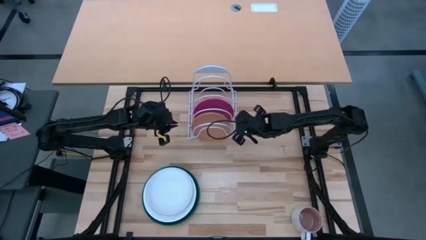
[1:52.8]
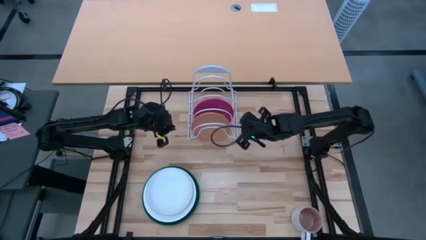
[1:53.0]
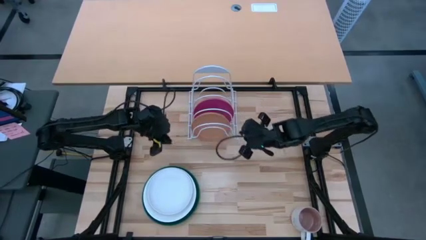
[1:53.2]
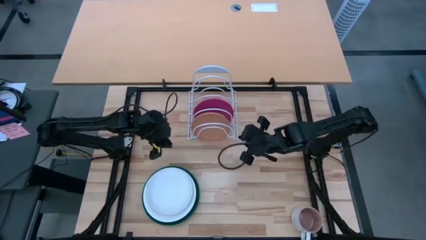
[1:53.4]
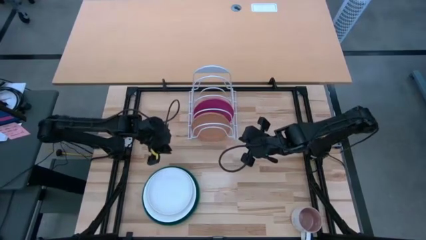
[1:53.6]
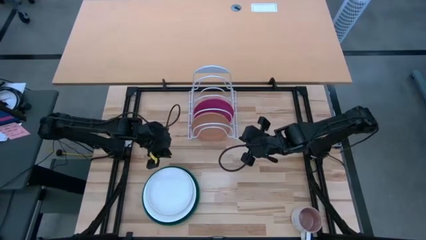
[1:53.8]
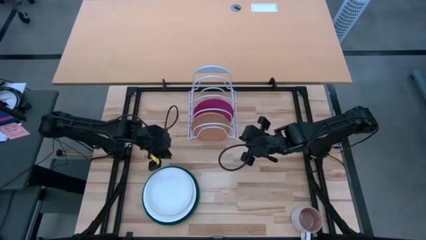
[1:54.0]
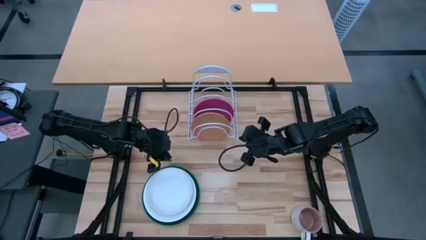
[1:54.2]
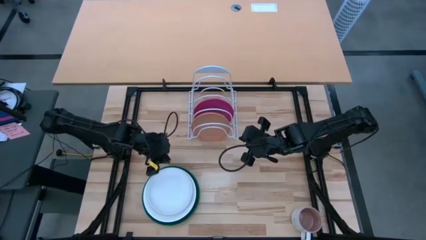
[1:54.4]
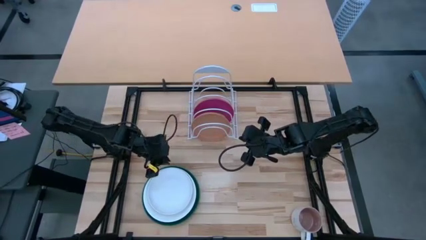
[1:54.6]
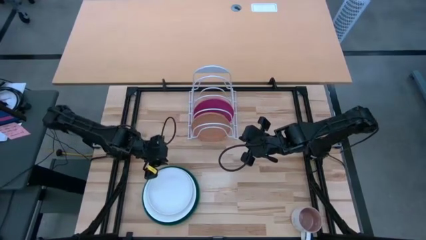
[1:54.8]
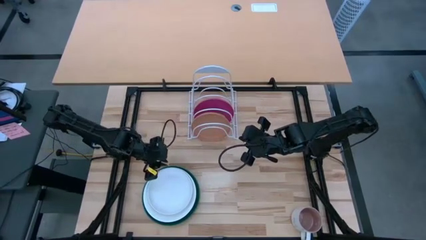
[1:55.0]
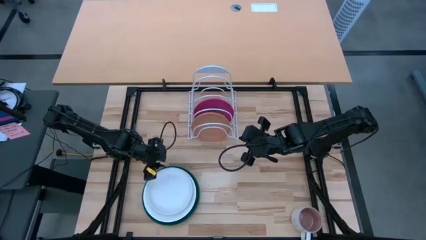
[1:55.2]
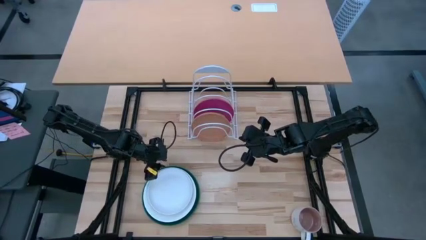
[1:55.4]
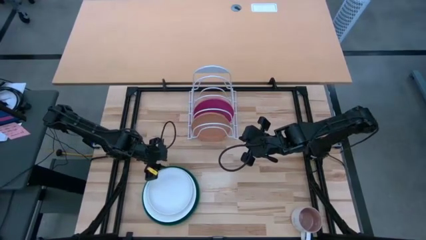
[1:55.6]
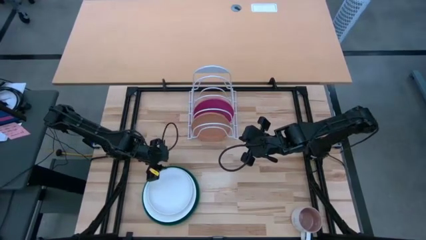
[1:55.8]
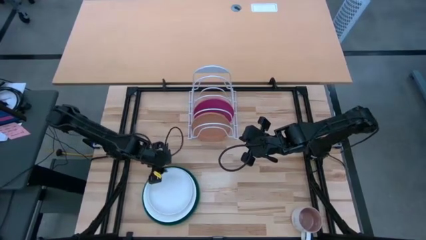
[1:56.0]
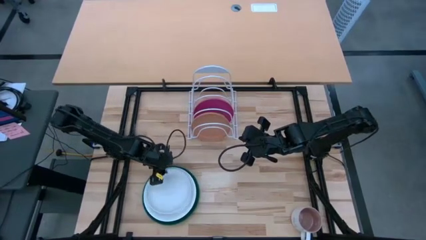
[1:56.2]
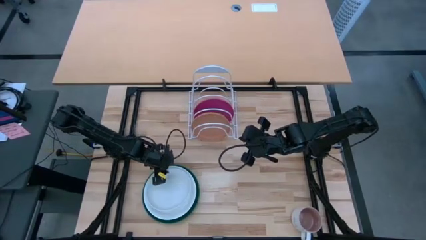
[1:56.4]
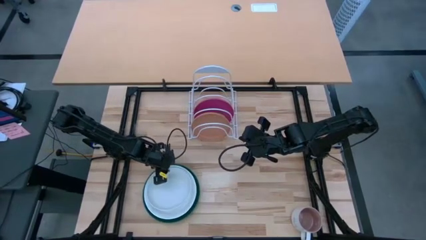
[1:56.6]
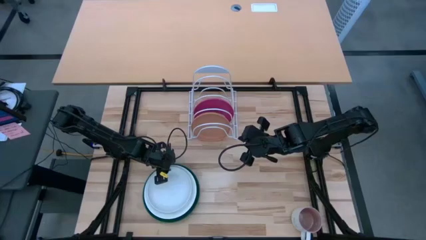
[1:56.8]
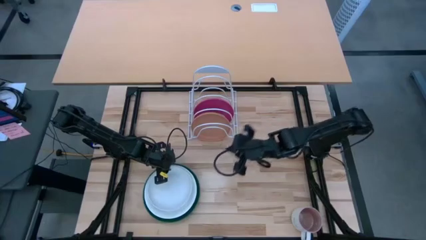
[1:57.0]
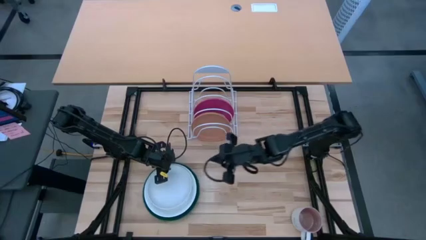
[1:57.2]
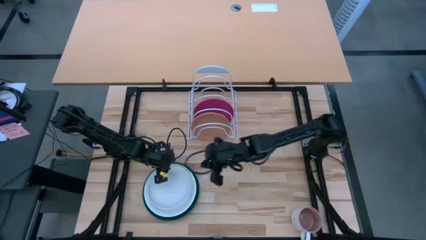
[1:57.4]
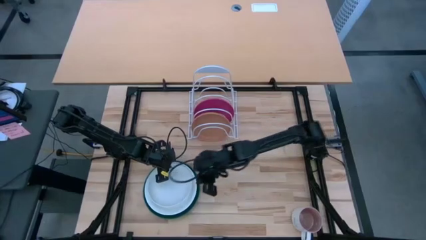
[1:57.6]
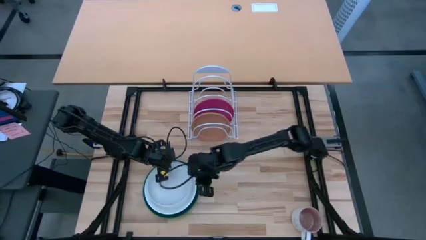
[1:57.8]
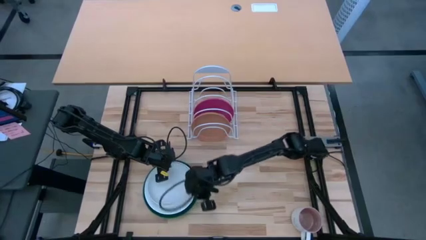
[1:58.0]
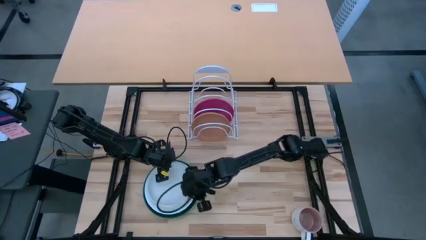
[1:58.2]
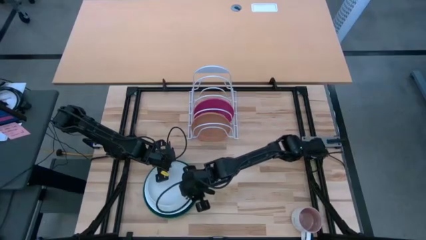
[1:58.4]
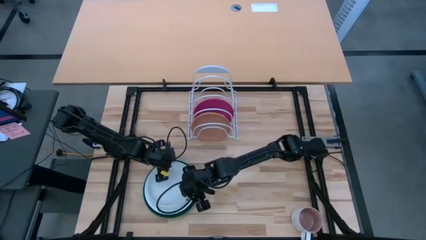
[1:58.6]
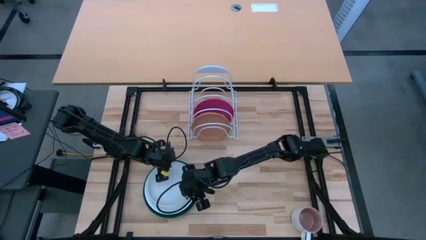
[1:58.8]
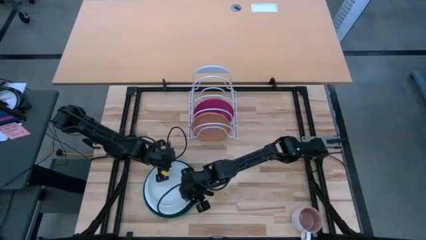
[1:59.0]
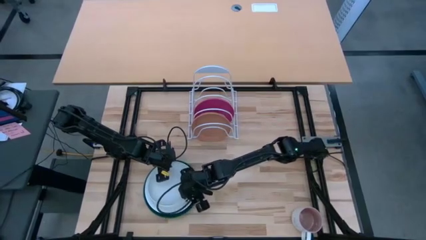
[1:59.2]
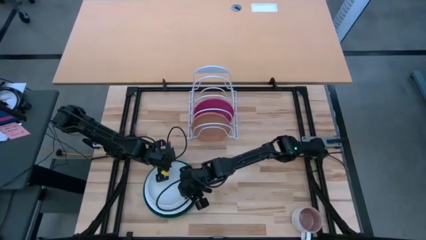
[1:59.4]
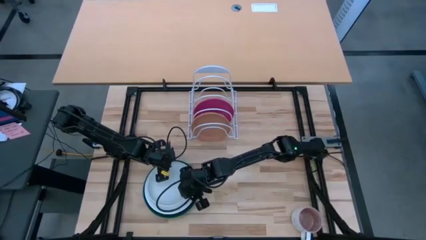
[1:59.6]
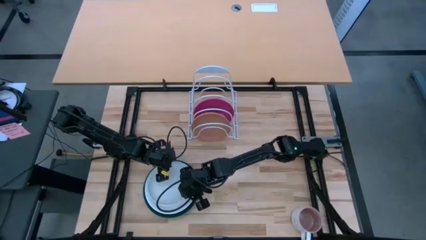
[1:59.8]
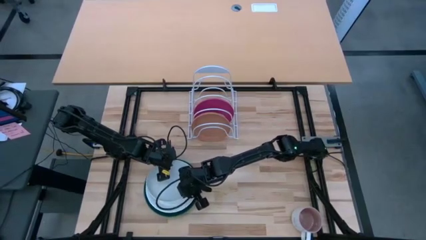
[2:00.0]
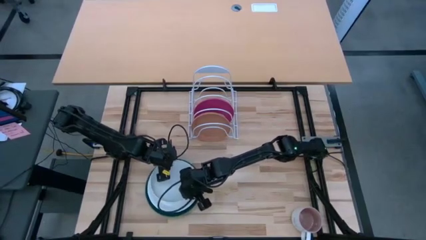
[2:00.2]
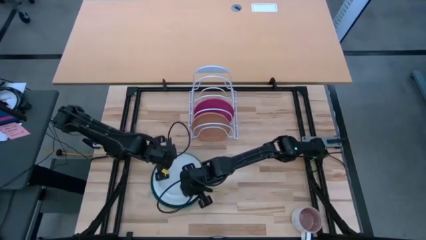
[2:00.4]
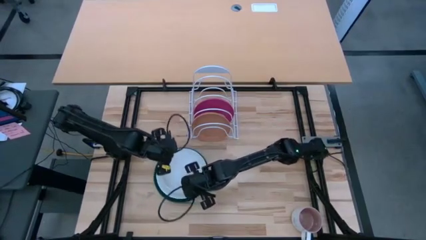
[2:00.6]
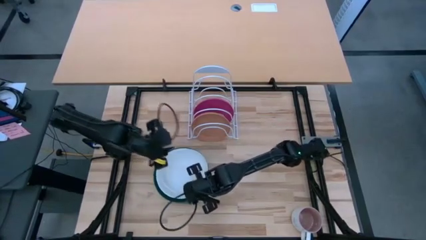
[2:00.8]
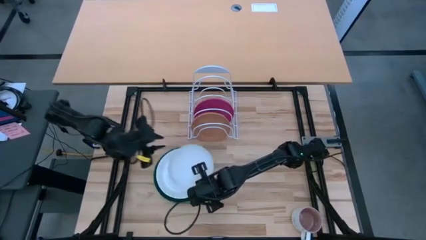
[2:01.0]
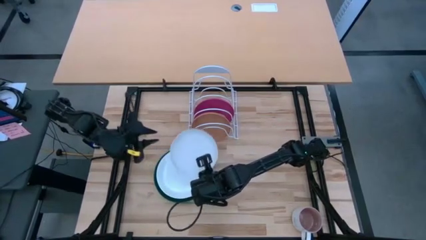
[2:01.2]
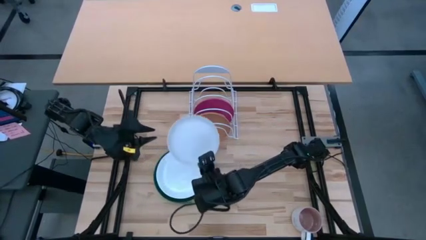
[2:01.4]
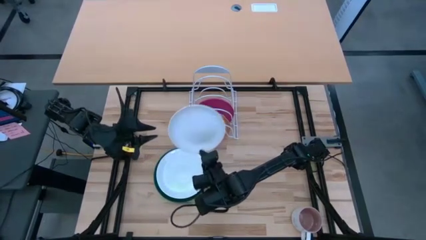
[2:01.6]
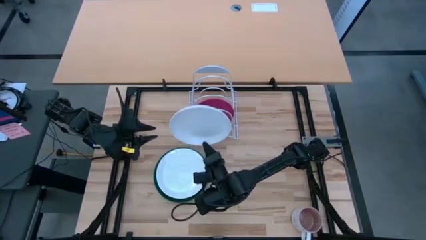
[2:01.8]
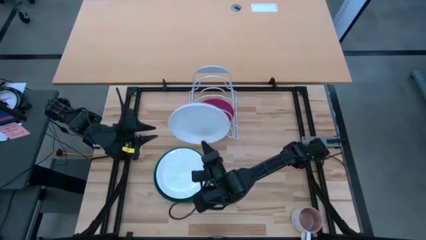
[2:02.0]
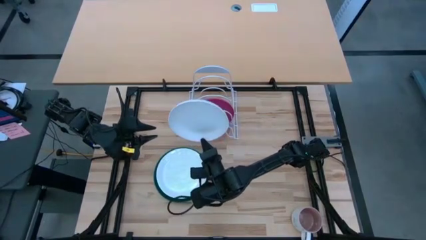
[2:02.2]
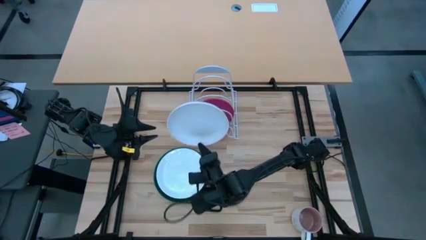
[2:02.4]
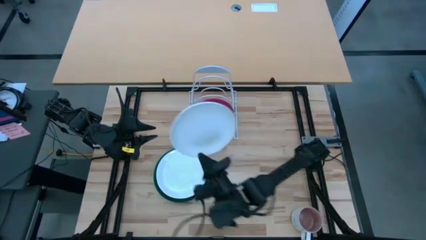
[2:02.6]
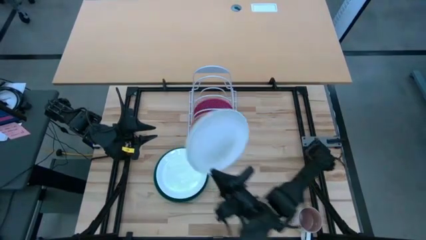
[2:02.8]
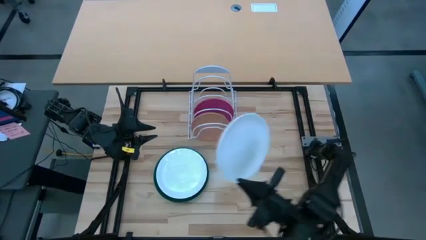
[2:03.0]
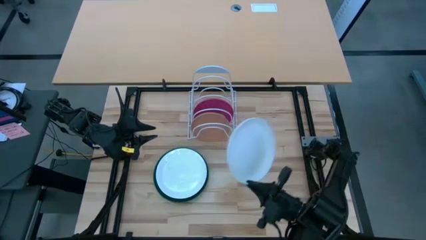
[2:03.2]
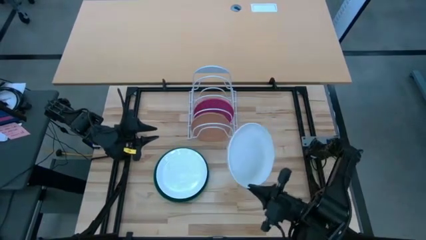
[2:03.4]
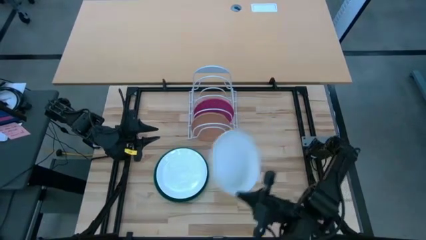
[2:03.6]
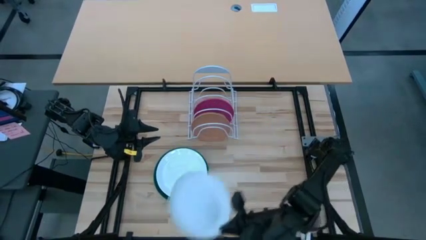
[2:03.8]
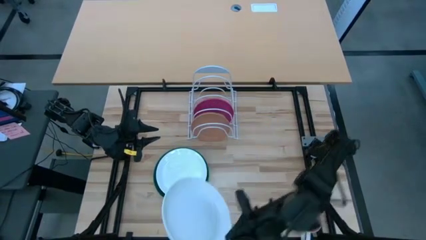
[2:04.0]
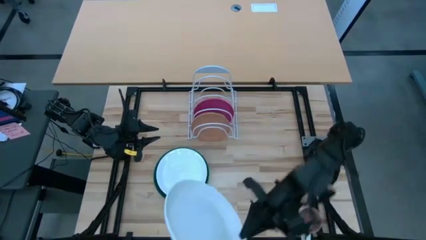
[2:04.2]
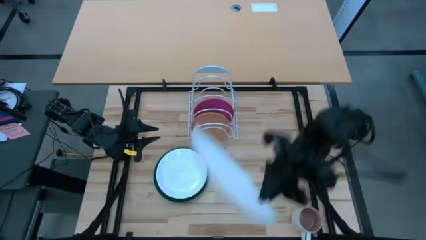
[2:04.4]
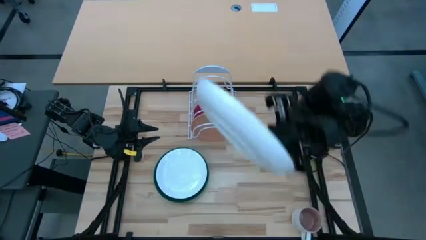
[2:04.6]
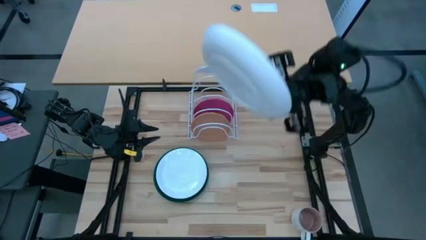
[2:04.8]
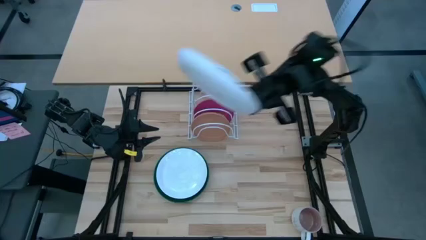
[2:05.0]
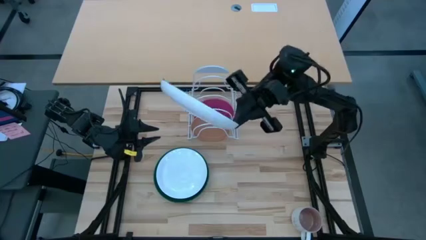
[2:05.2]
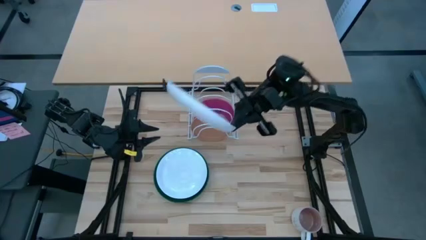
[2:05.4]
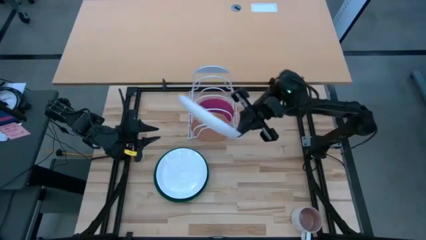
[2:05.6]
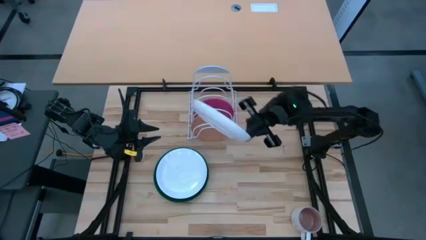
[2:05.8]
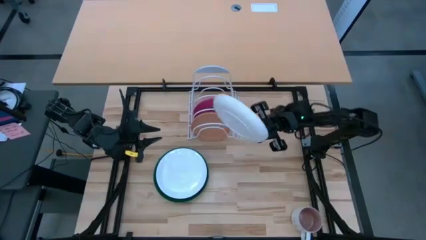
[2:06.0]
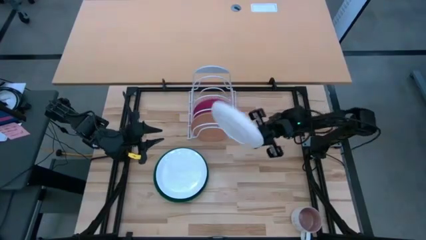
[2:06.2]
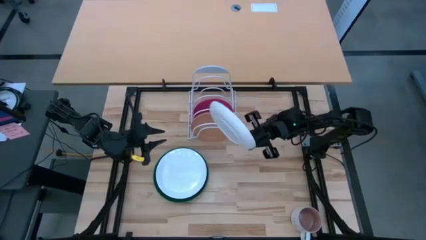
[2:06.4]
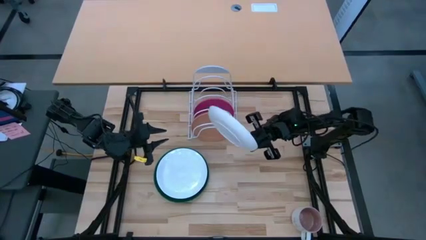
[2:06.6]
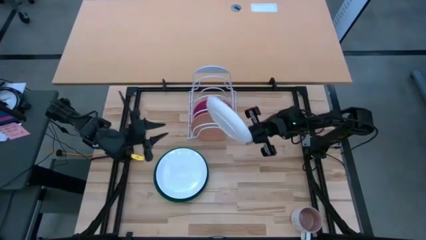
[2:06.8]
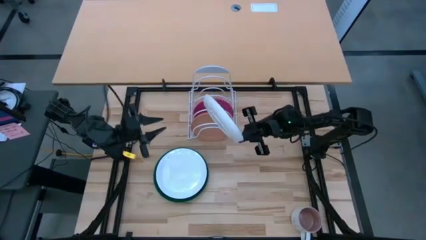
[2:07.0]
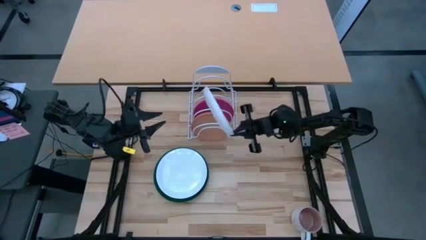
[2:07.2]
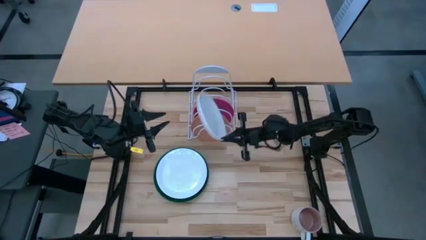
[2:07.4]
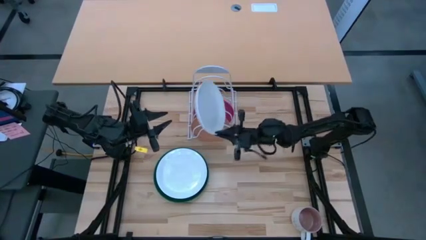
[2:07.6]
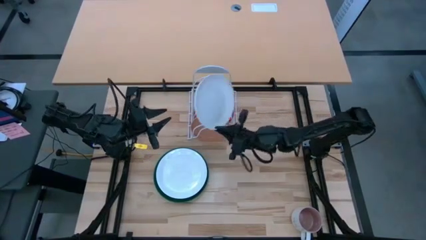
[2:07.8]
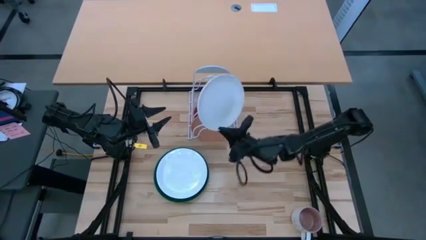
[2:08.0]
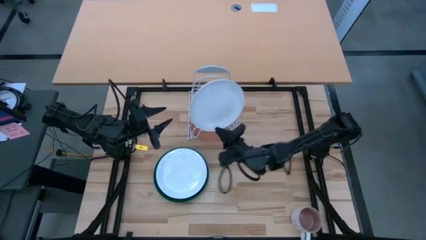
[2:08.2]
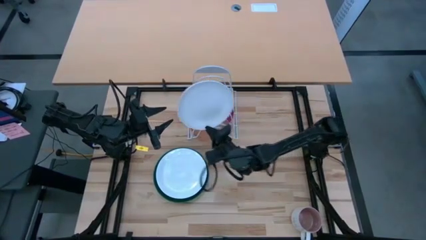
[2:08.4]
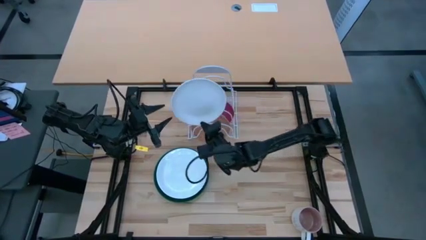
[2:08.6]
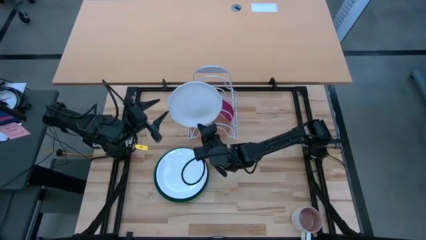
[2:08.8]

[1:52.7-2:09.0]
Task: Sort dishes
Put the white plate on the dish rack
